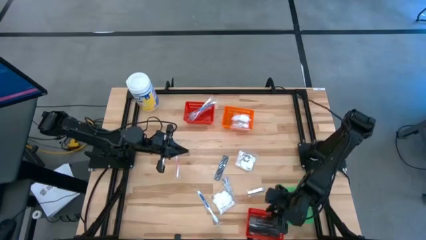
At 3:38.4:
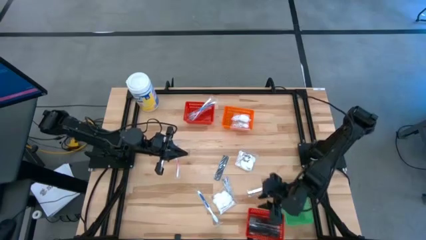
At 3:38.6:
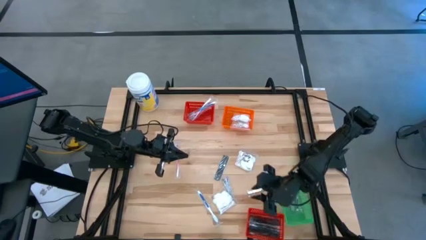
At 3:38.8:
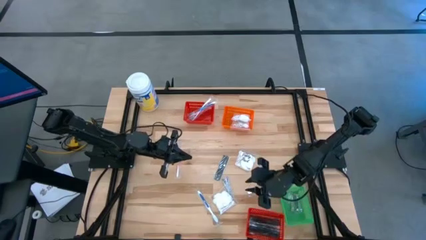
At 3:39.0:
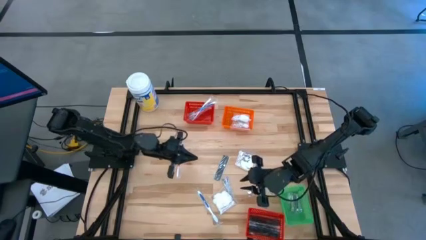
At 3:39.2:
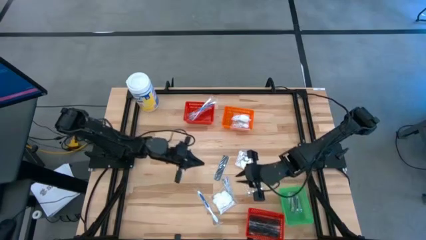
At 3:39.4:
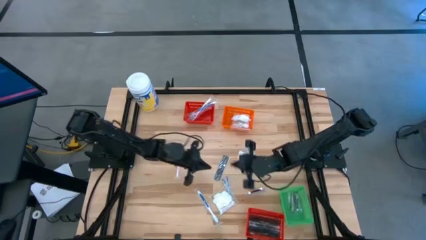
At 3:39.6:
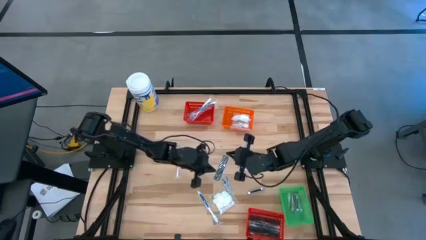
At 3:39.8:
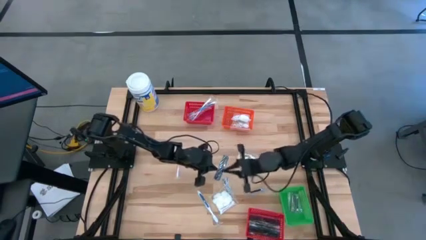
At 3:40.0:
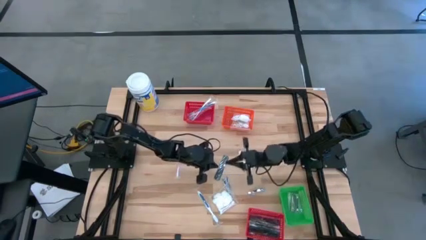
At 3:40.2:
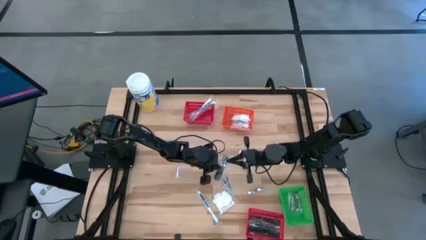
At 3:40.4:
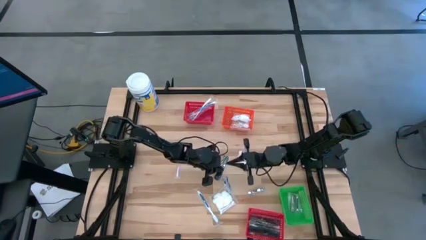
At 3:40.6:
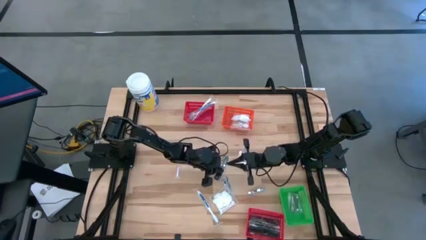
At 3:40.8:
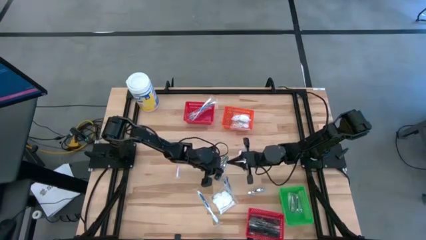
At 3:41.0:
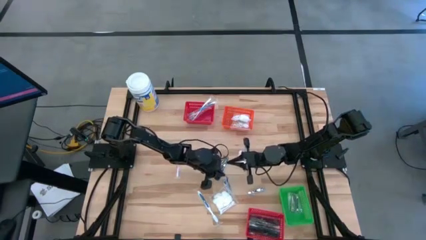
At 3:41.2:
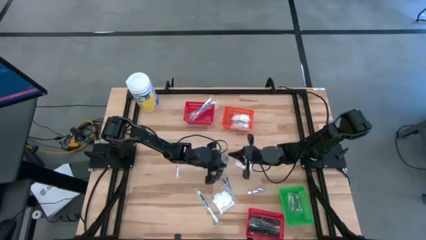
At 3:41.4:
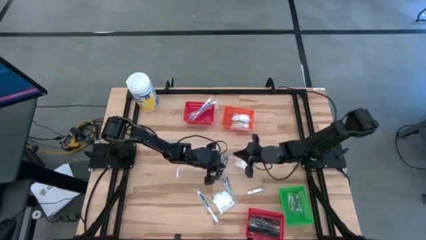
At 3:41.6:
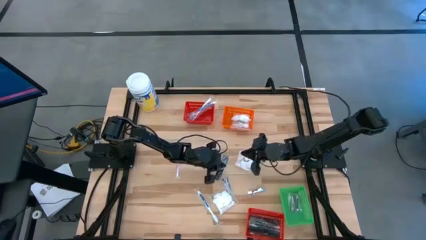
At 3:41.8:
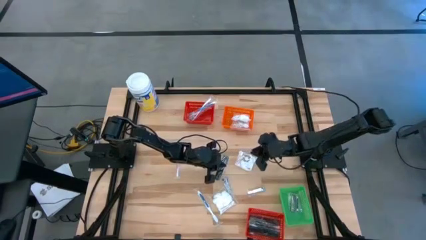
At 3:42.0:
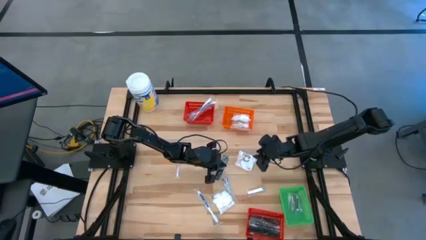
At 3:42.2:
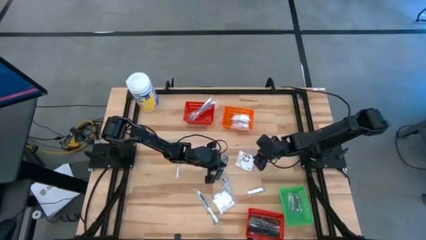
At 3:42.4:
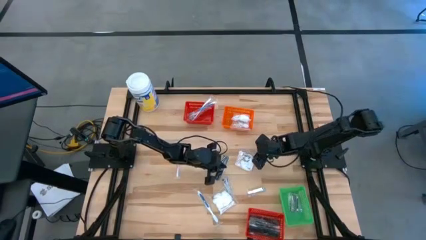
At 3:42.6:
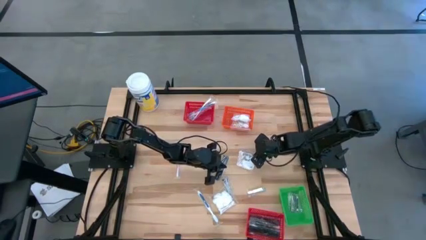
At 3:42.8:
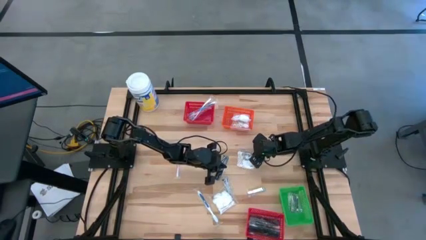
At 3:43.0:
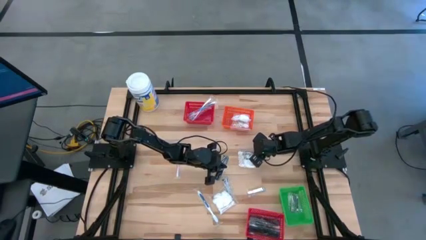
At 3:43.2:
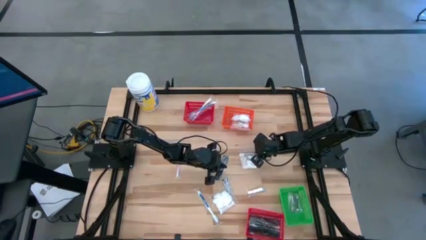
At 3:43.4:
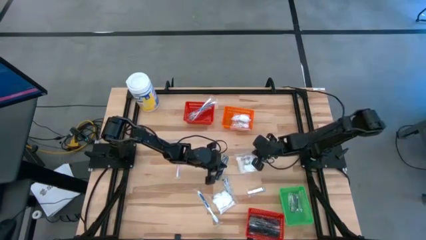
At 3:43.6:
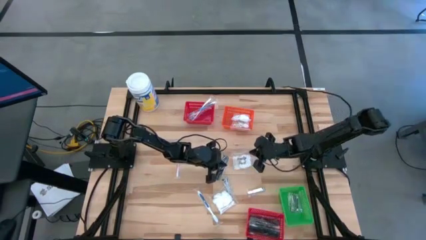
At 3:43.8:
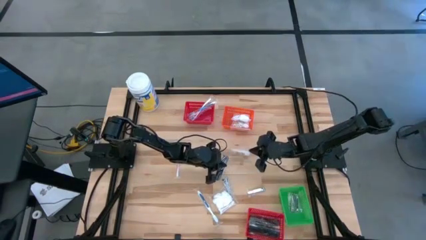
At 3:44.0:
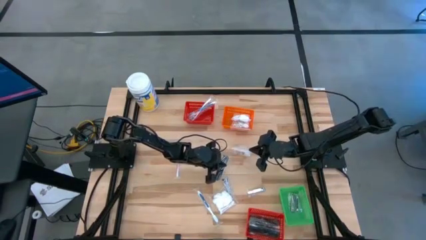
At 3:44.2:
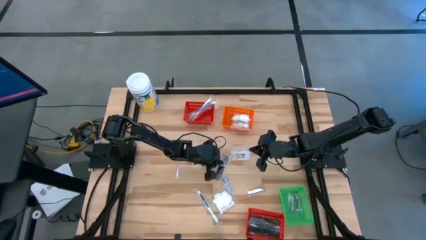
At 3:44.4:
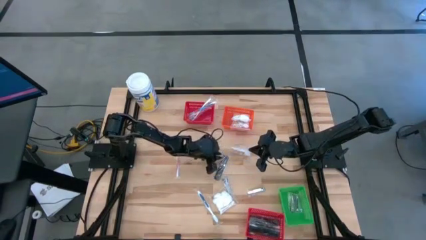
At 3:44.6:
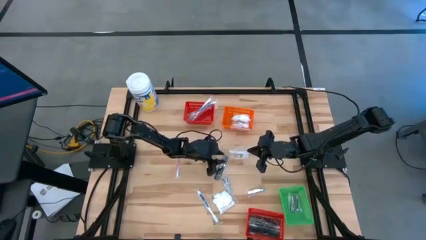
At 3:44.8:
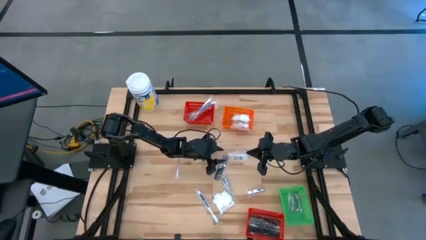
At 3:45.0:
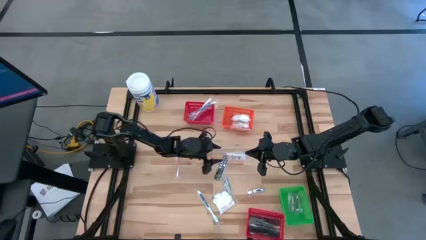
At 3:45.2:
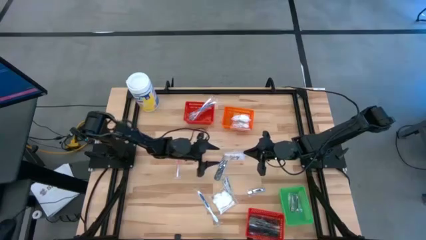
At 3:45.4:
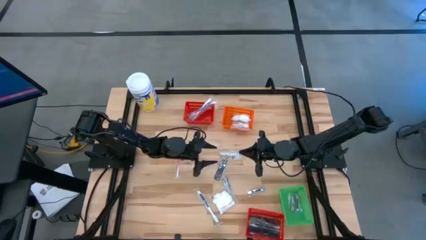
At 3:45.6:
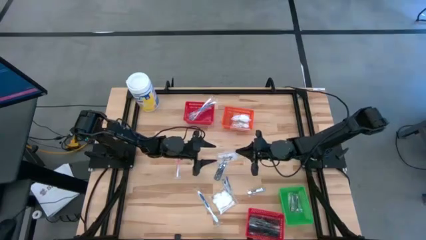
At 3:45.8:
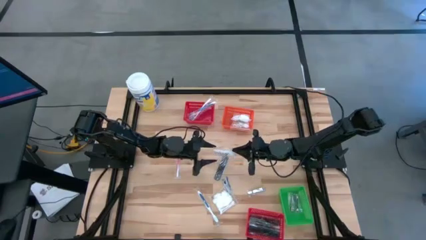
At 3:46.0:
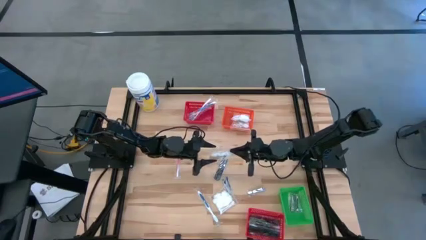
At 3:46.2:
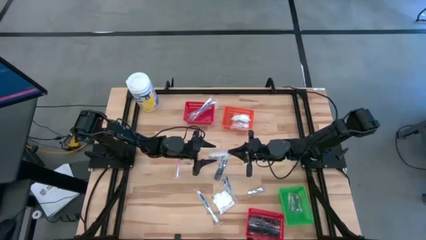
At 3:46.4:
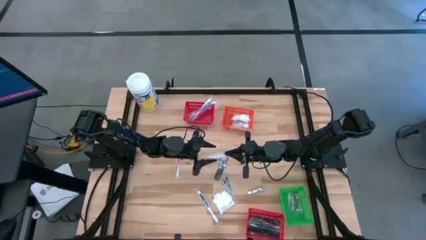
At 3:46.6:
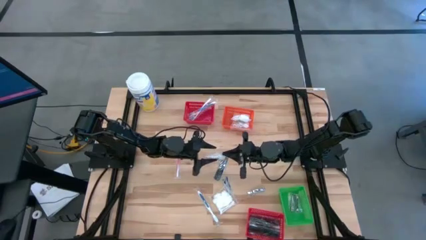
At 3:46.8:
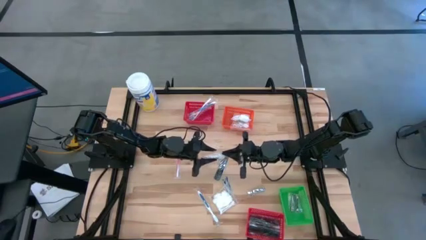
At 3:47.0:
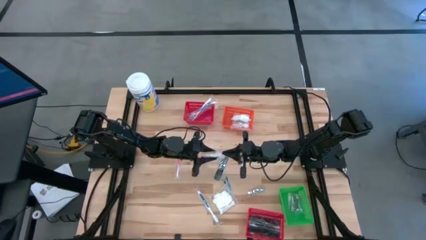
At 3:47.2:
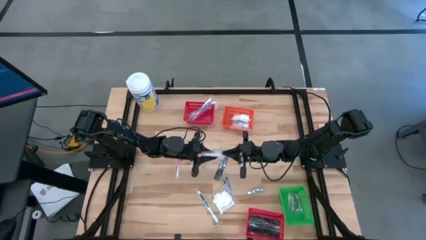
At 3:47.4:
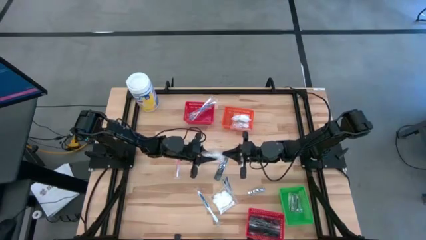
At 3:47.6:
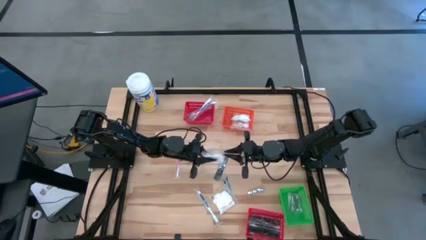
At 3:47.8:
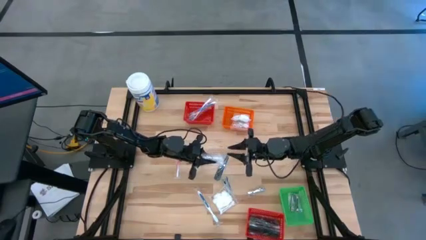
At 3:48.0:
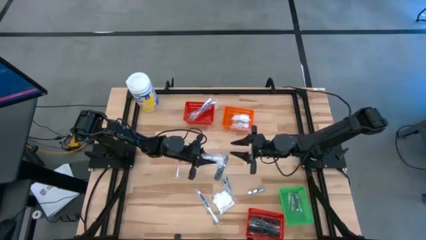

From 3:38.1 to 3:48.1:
Task: Pick & Place Travel size toiletries
Put the white cotton pack into the orange bin

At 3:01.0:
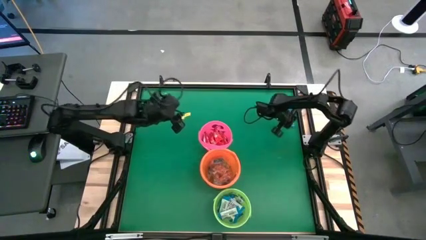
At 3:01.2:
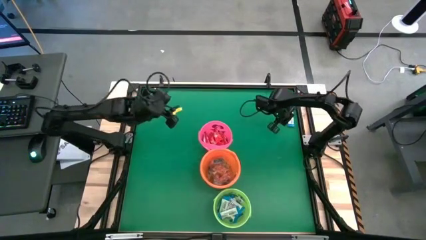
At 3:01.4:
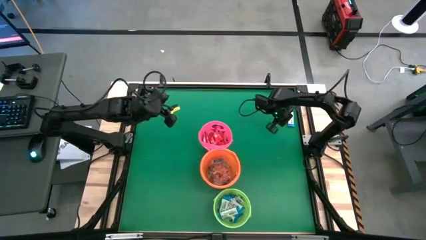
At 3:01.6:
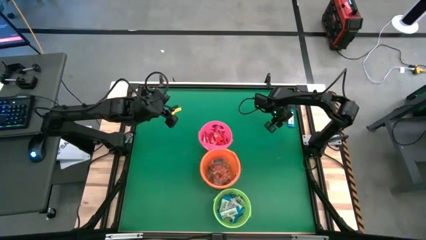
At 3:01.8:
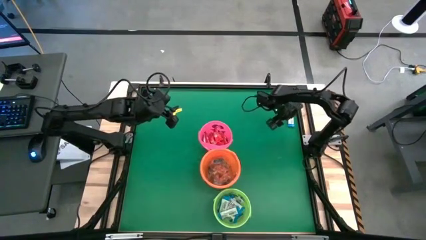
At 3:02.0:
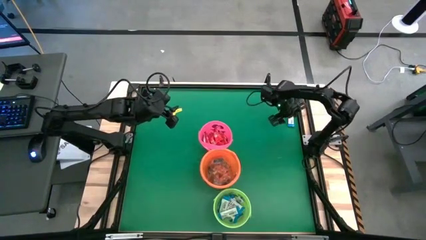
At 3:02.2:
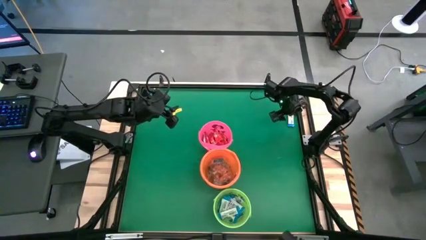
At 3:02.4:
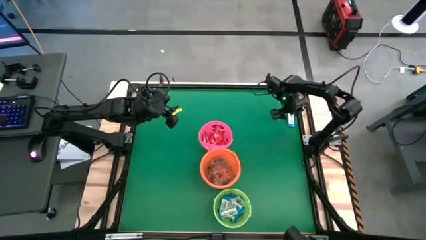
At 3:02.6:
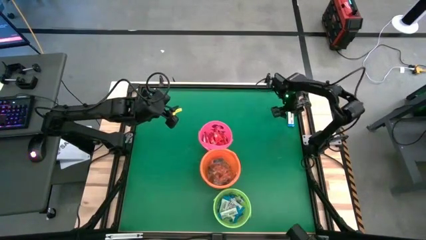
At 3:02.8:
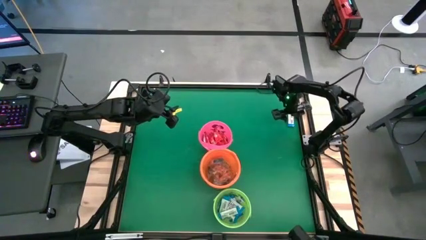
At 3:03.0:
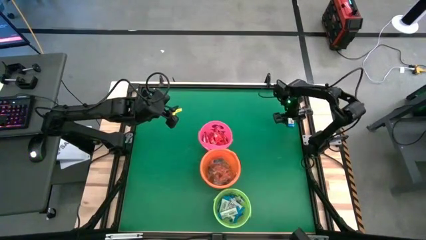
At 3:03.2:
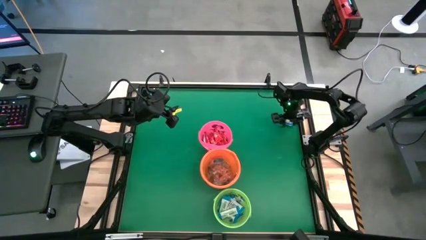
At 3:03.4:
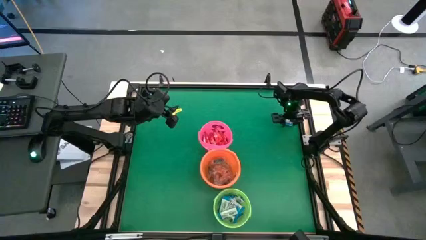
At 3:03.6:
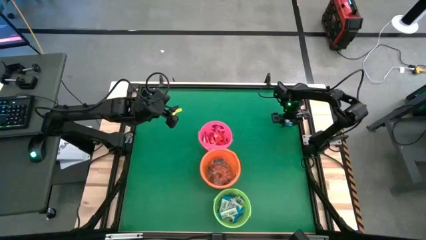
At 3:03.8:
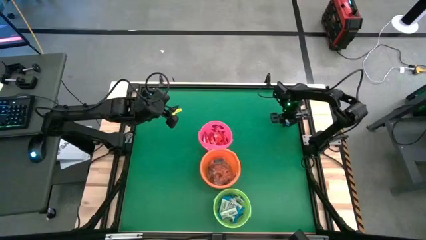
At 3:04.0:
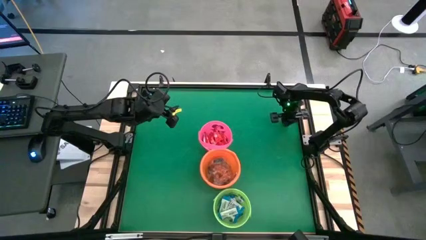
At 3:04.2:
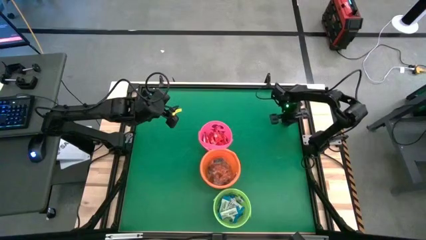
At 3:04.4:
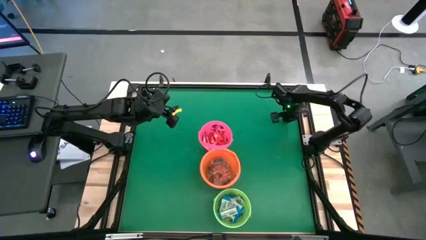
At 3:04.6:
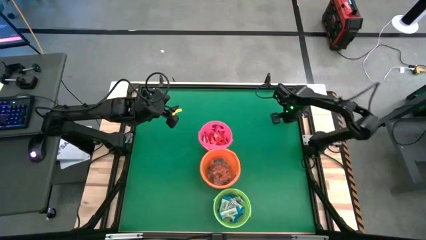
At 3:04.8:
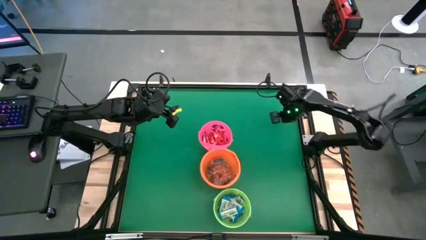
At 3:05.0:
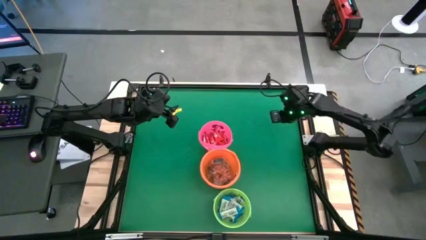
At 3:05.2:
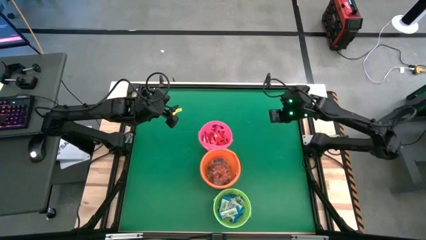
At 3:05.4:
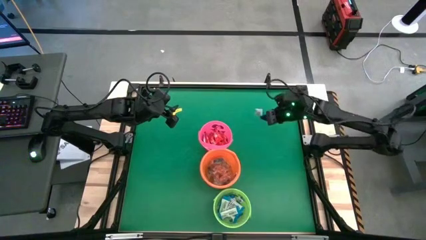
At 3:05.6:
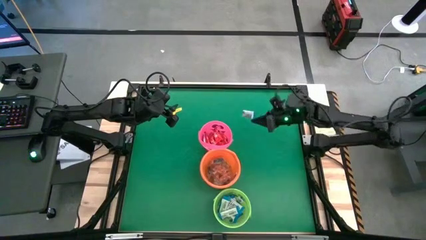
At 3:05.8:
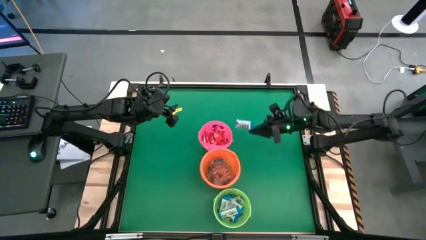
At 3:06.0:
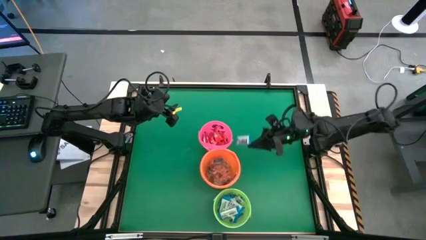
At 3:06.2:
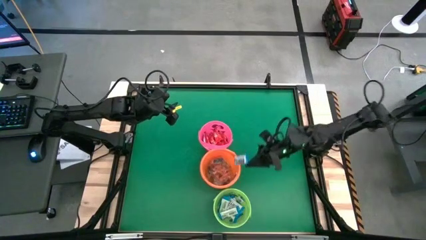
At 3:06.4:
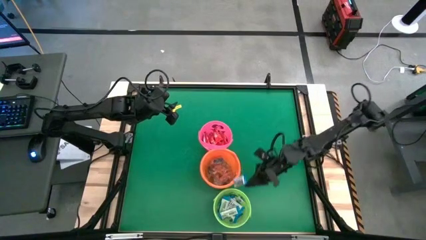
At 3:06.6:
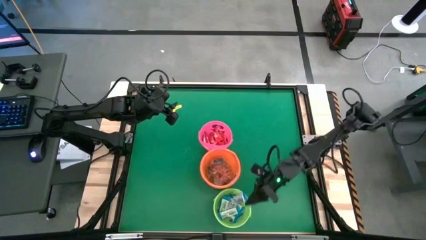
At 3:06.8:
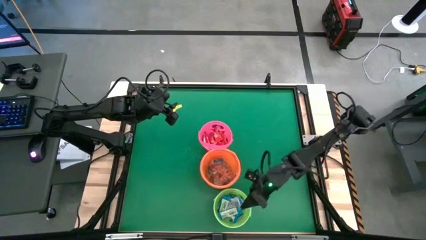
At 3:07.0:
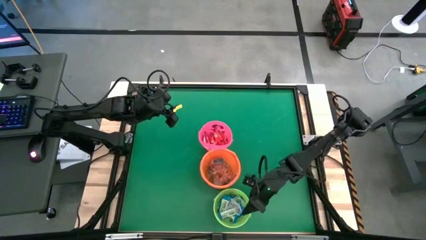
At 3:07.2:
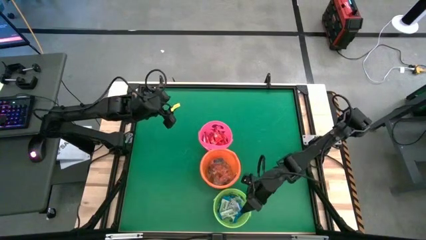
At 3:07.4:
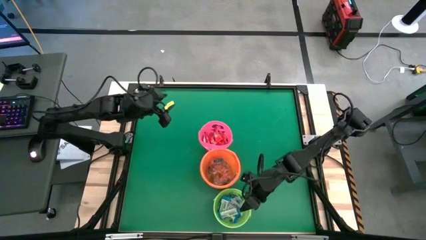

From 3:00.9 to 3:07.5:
Task: Sort candy by brand, put in halloween buckets
Put the white chocolate into the green bucket
